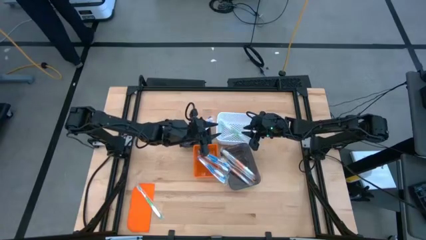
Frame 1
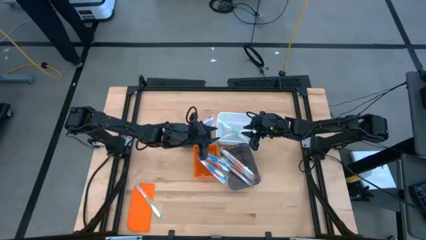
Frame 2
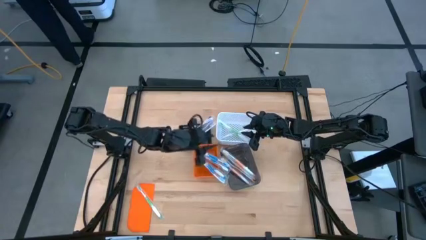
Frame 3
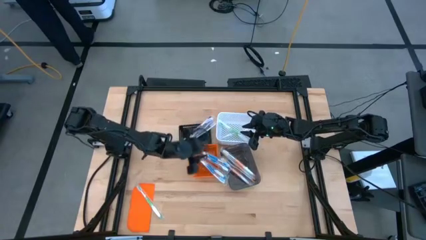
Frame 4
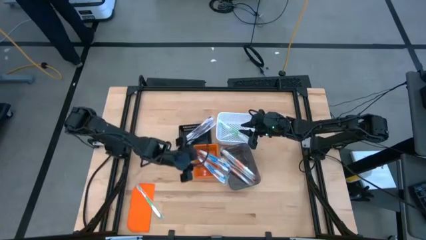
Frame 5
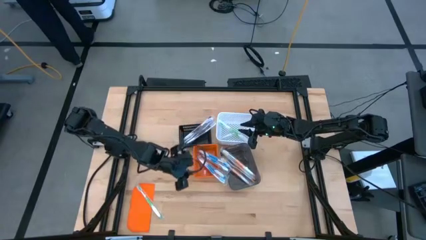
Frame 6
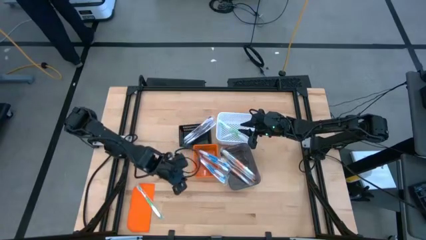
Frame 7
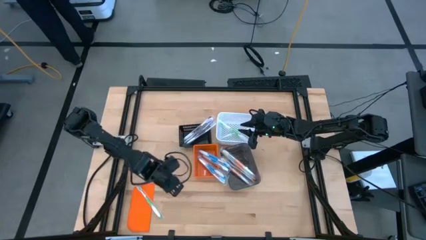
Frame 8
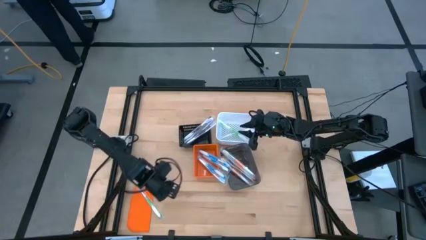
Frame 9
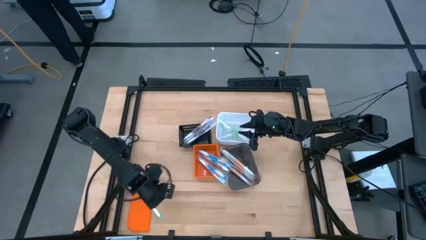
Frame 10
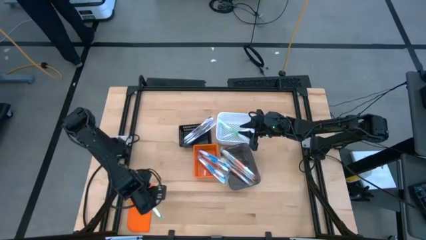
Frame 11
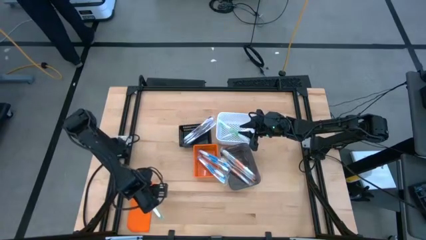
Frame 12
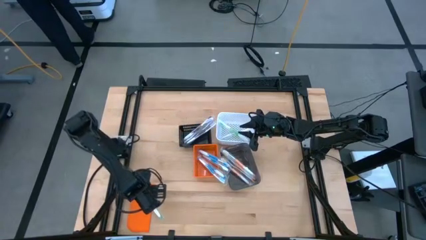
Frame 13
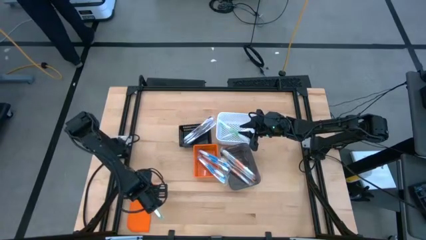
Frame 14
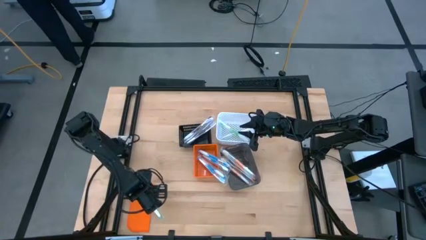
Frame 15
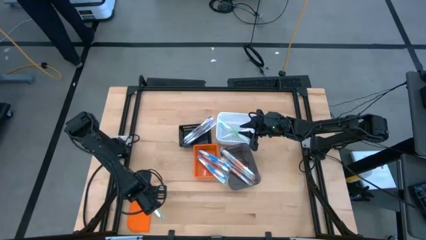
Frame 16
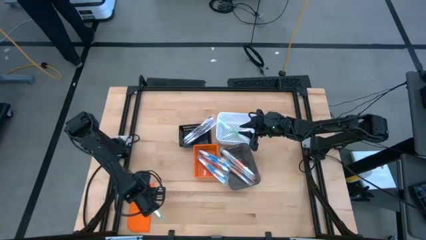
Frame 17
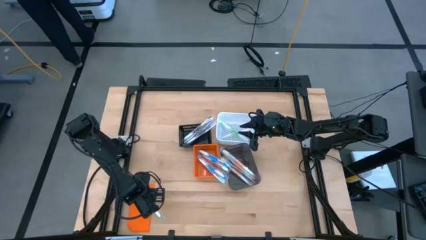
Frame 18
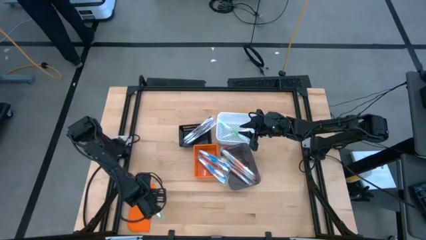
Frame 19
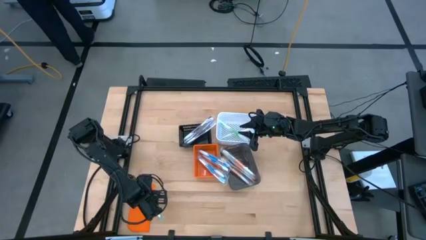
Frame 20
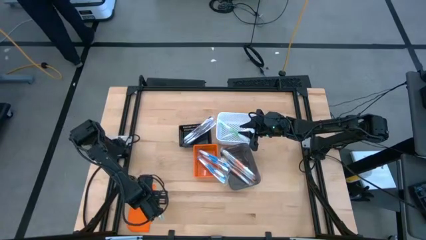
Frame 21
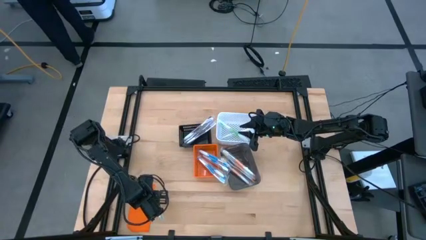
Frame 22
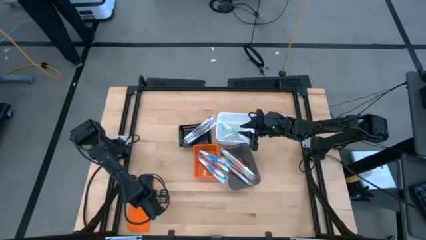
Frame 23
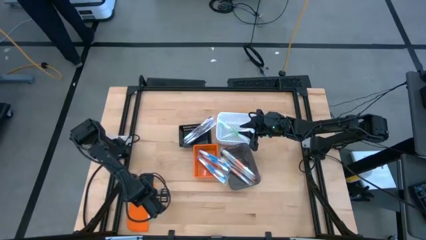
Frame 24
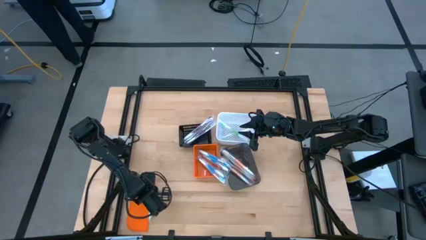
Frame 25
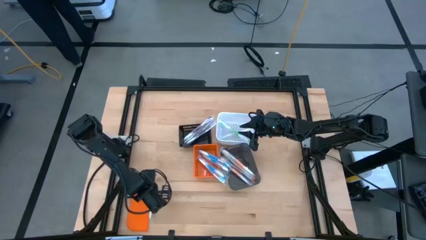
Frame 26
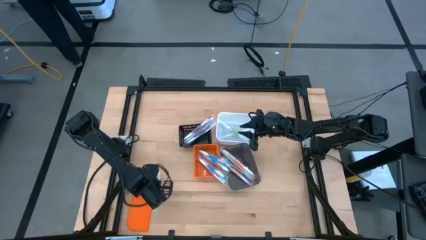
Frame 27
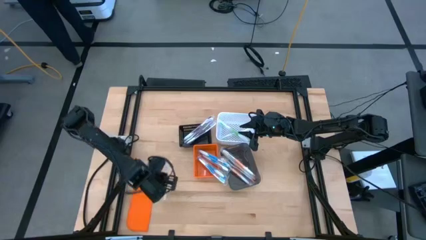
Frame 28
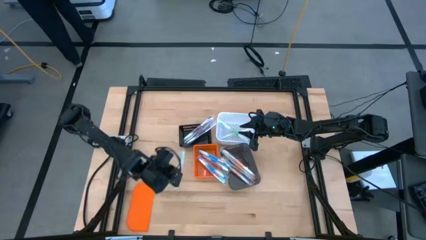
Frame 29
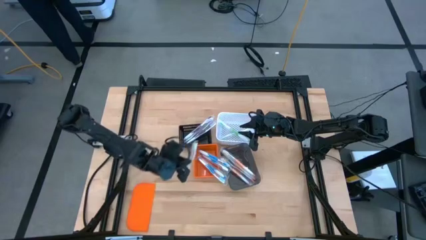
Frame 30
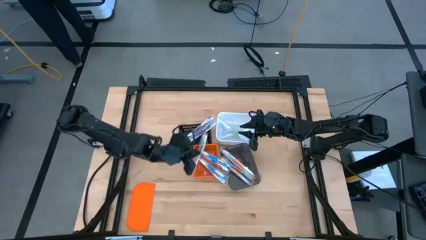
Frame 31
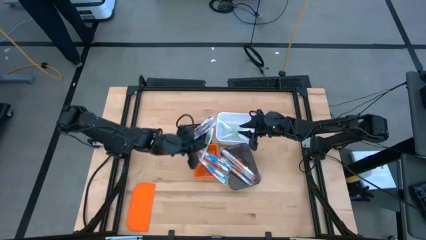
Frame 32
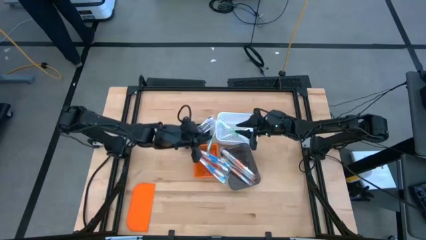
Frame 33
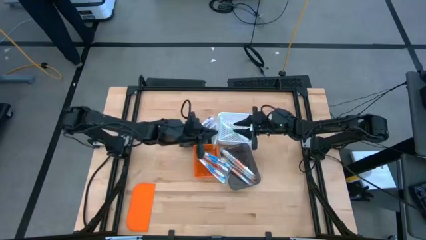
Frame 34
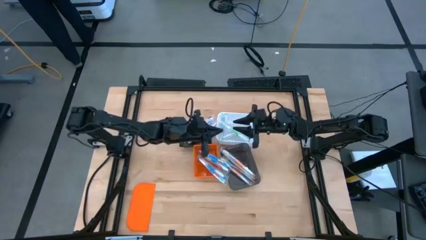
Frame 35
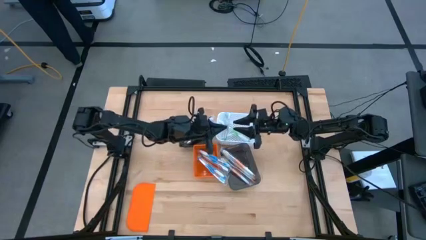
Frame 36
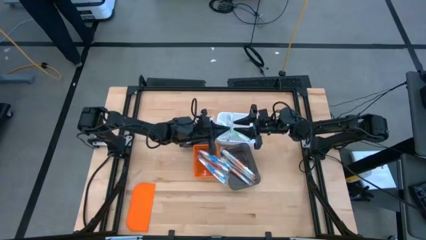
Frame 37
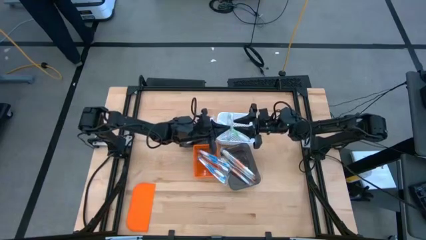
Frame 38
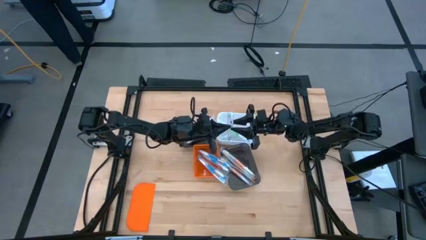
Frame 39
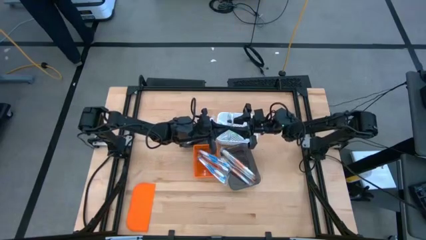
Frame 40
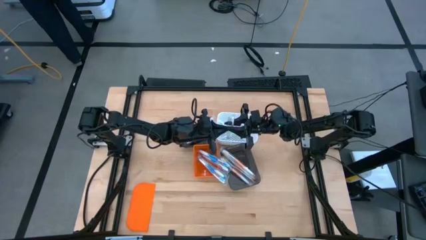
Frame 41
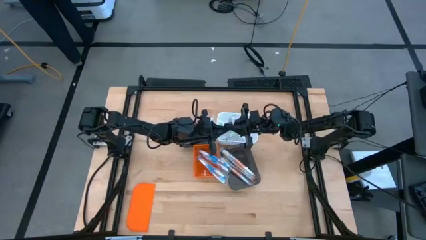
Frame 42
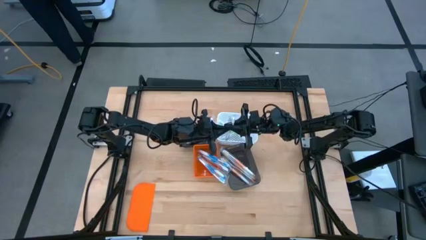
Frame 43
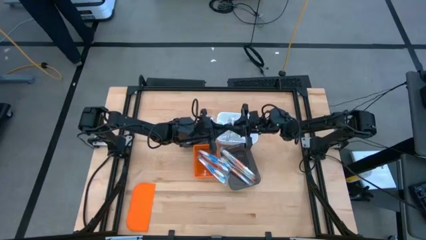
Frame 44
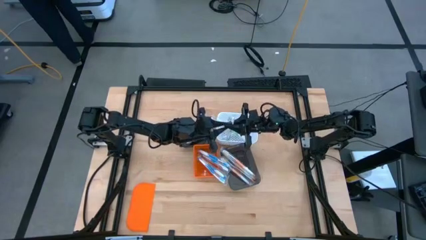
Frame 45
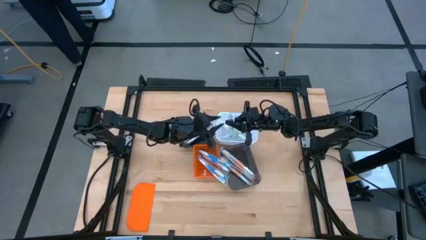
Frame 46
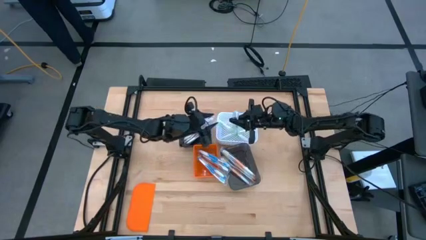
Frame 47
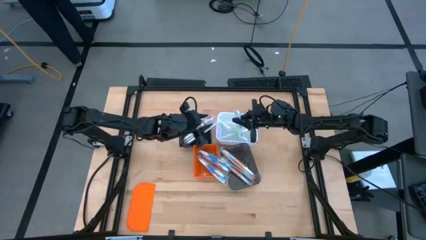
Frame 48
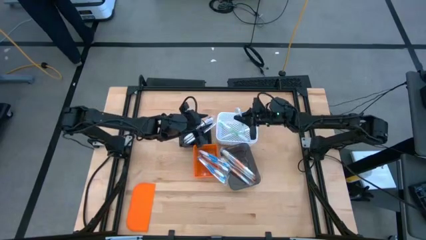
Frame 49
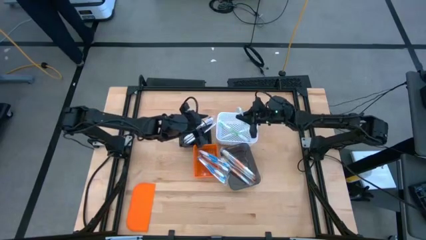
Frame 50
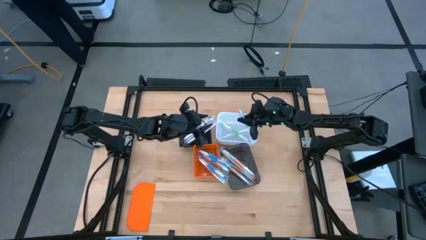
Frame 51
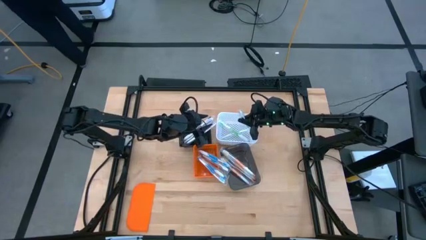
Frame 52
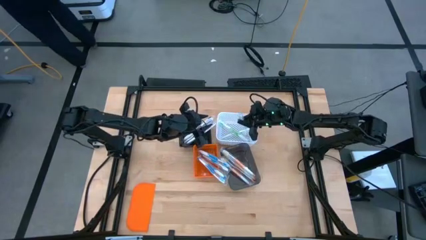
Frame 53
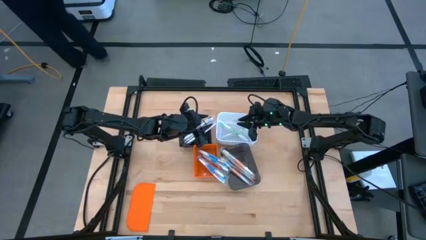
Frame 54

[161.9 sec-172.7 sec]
Task: Pick & Place Toothbrushes
Put the green toothbrush into the white bin

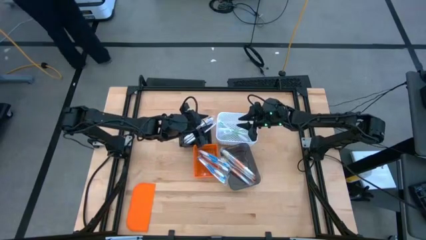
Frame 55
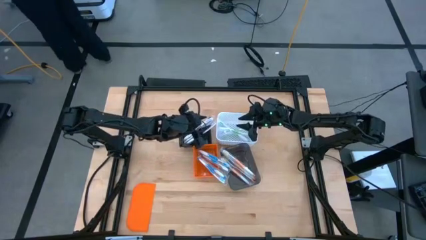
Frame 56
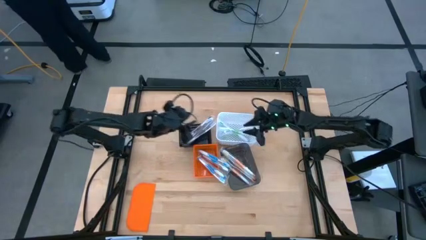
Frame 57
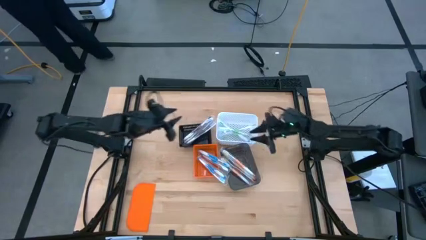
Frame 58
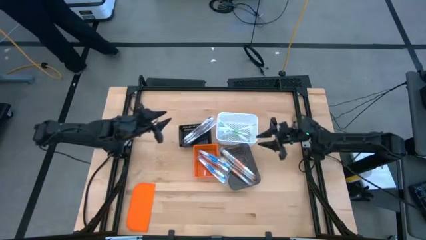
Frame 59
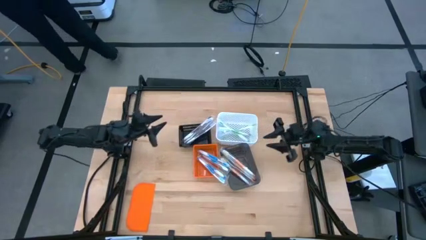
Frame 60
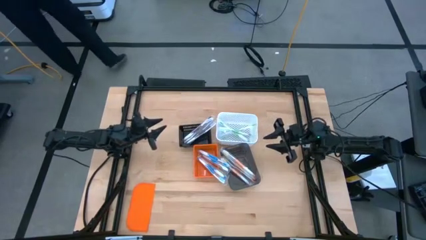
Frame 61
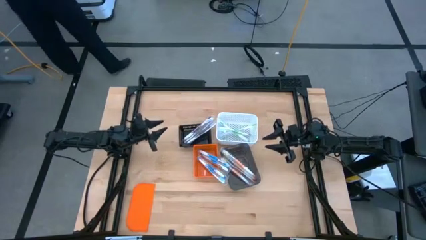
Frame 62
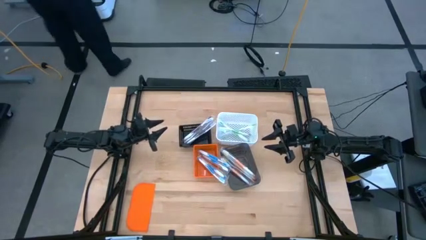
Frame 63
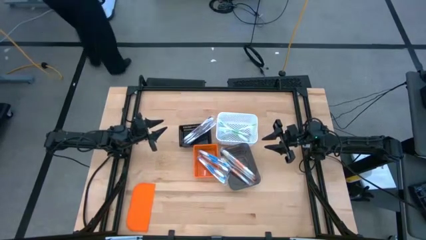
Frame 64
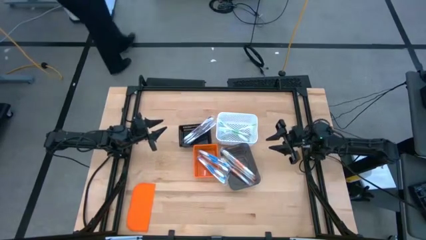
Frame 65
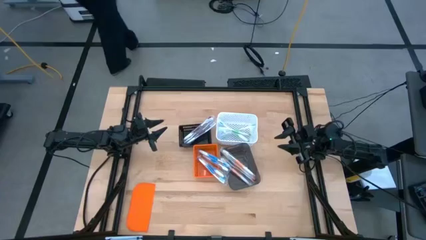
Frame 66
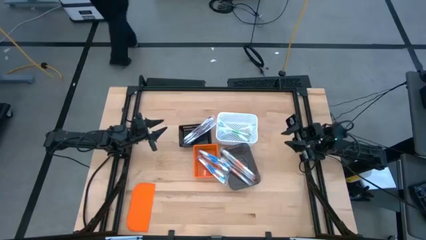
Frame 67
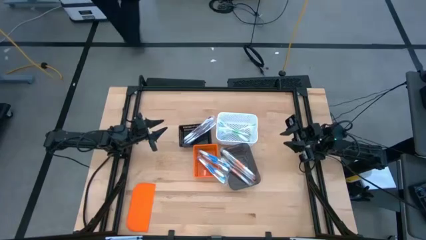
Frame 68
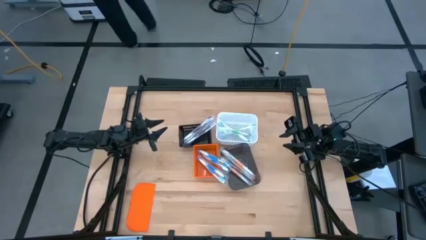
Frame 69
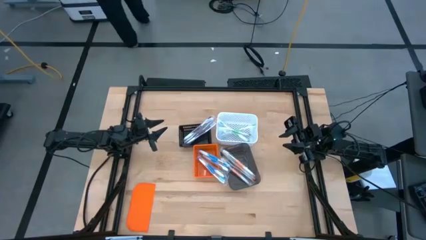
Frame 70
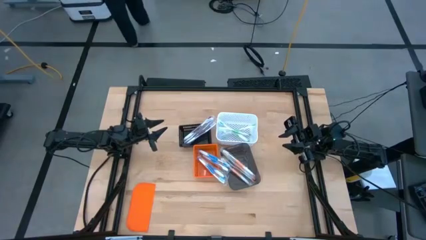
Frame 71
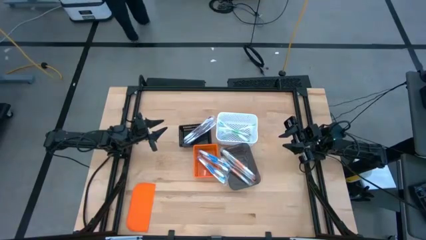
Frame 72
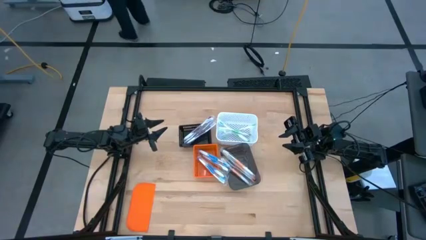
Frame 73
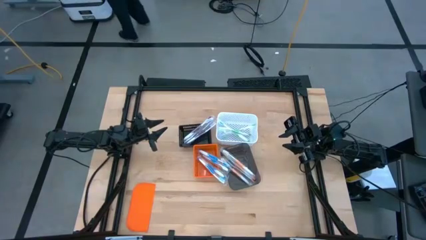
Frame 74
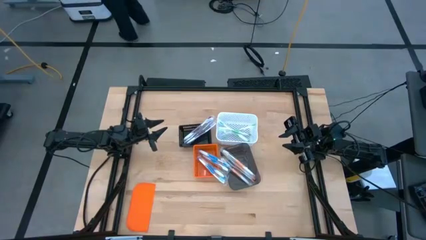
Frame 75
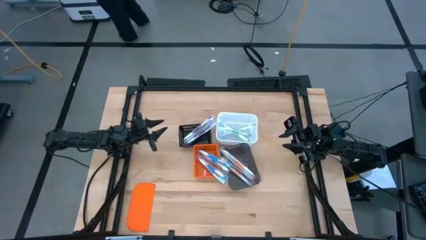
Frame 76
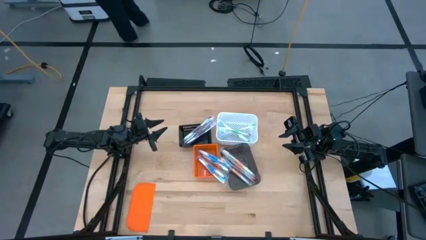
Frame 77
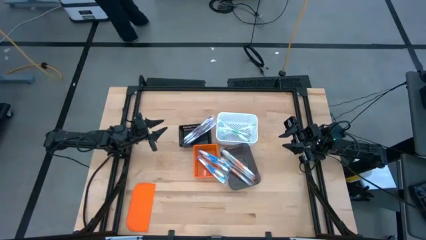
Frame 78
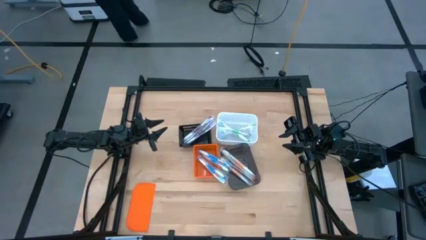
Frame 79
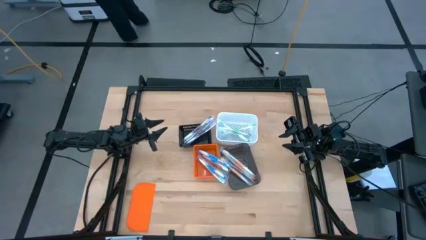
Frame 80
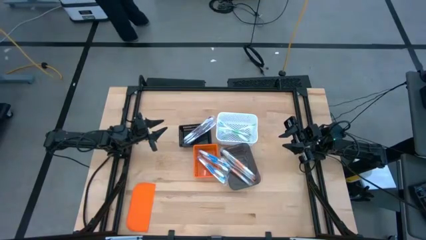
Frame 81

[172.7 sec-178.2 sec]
Return to Home Position

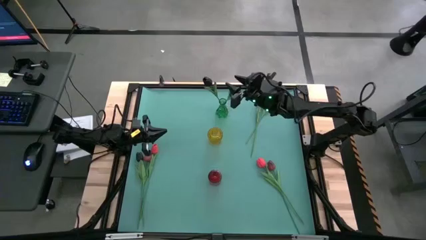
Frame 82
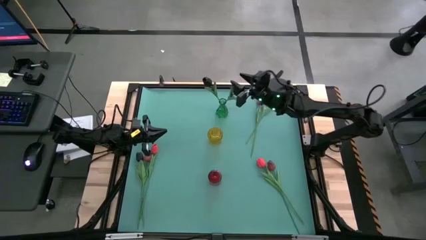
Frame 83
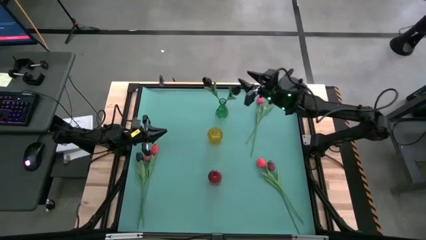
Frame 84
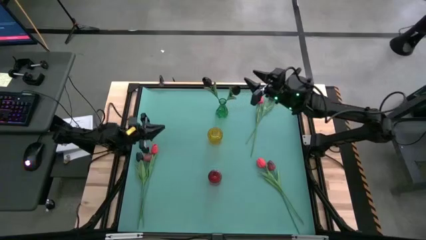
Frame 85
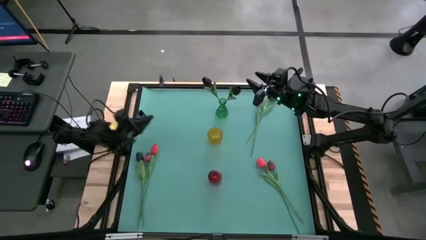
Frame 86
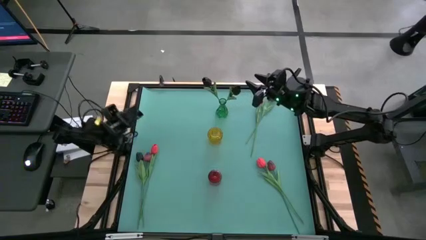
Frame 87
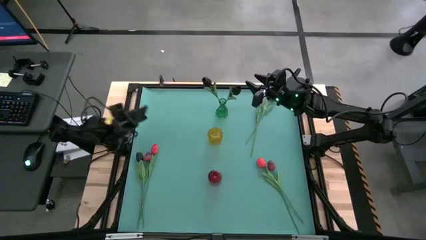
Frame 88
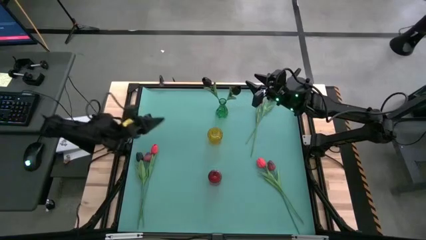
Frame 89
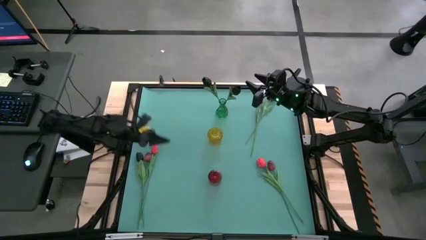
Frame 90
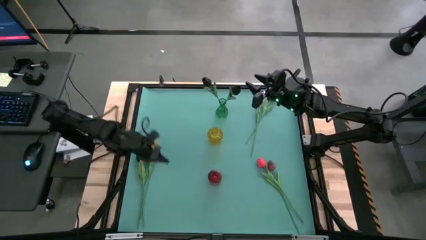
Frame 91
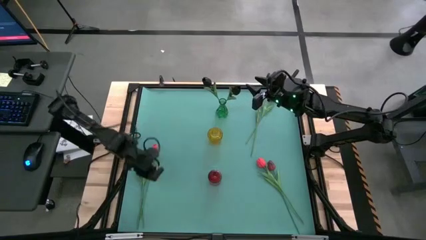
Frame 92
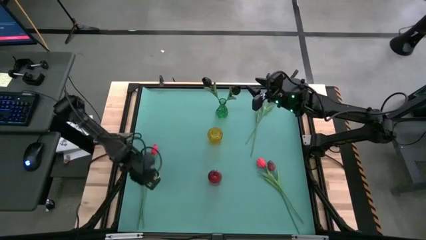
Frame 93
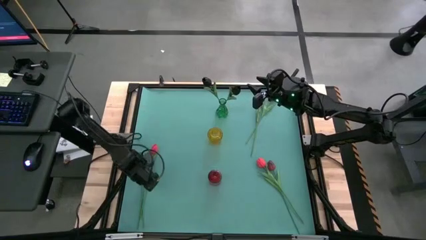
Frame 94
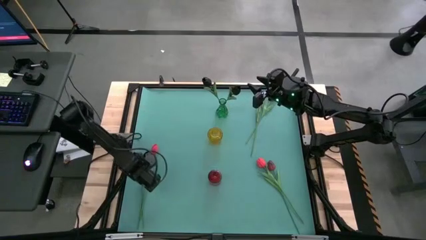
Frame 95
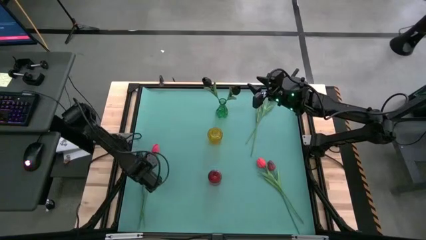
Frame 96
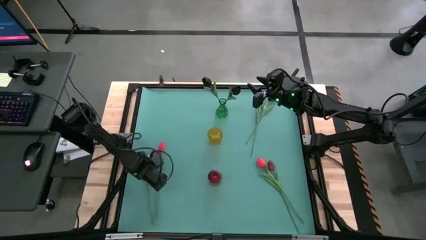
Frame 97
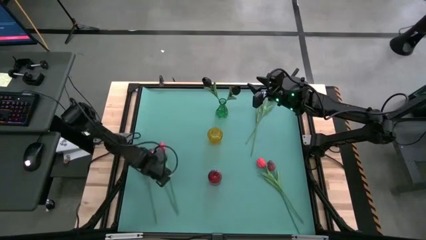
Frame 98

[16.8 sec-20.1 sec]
Task: Sort flowers into vase by color
Adjust the tulips
